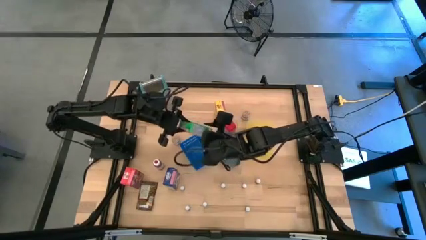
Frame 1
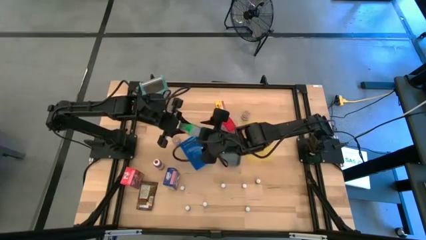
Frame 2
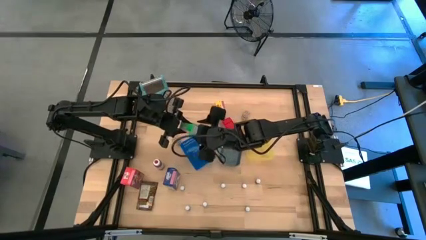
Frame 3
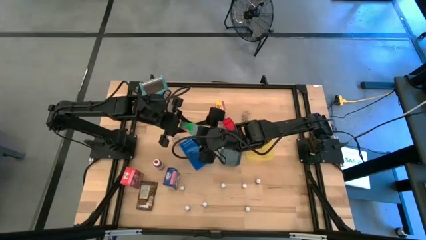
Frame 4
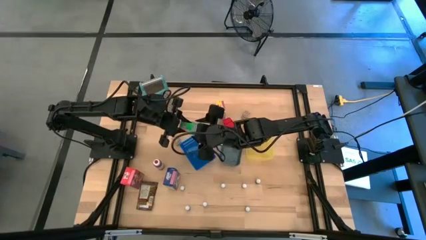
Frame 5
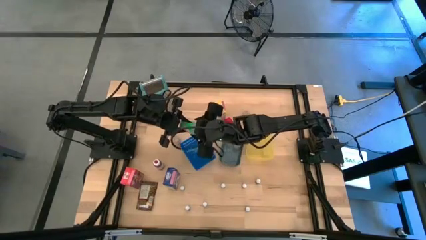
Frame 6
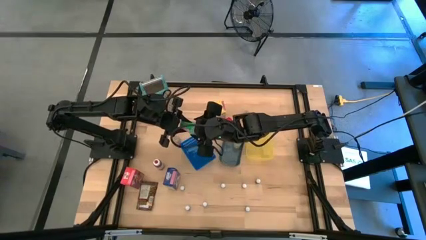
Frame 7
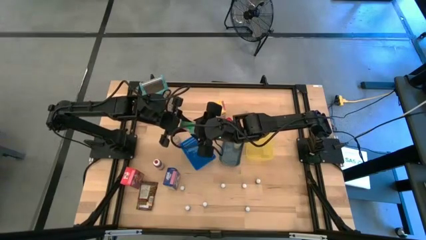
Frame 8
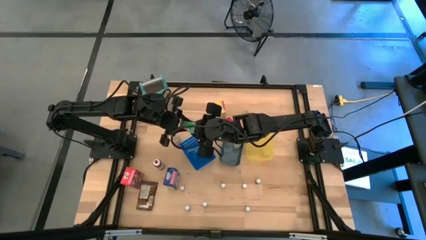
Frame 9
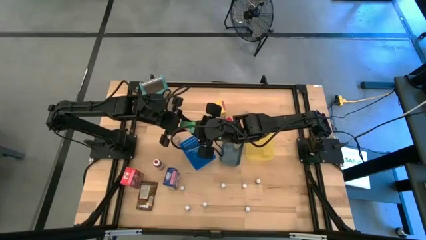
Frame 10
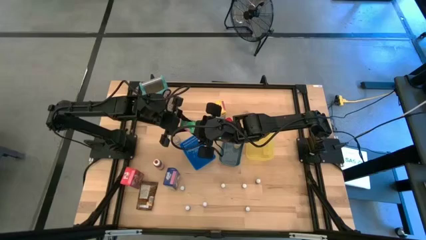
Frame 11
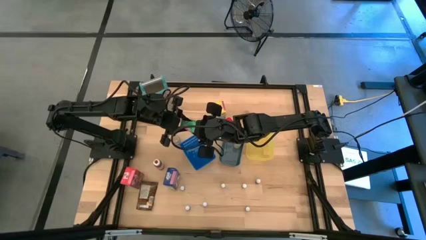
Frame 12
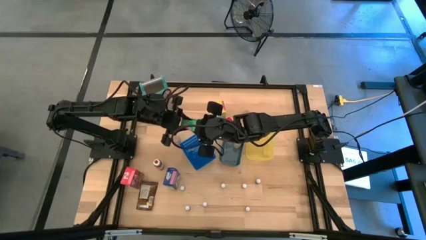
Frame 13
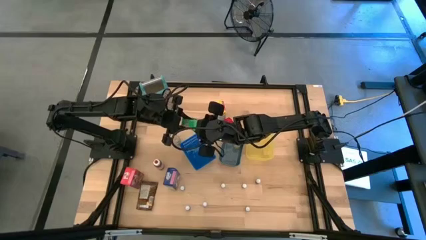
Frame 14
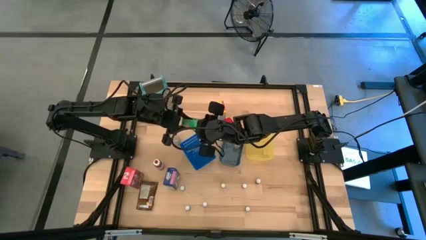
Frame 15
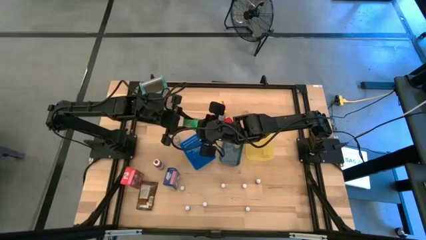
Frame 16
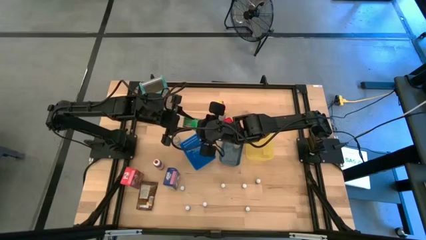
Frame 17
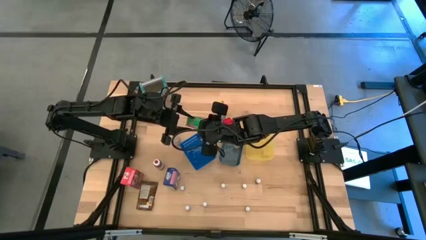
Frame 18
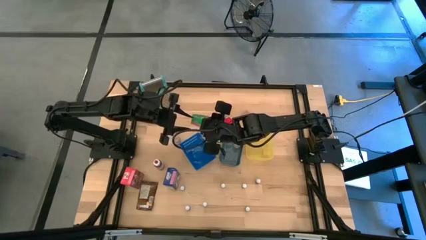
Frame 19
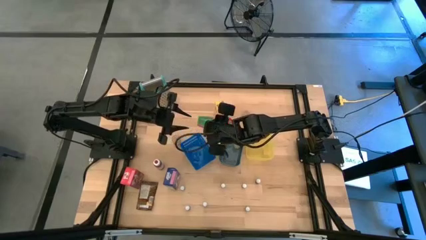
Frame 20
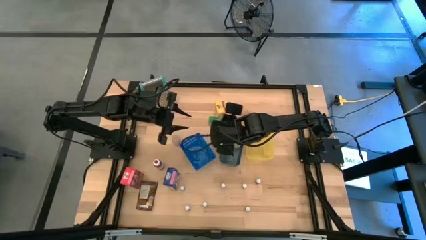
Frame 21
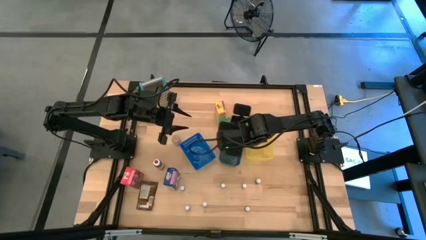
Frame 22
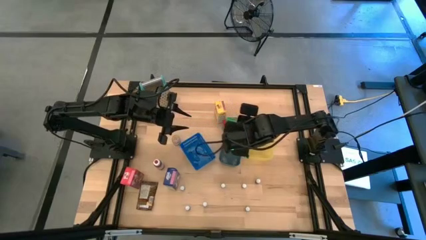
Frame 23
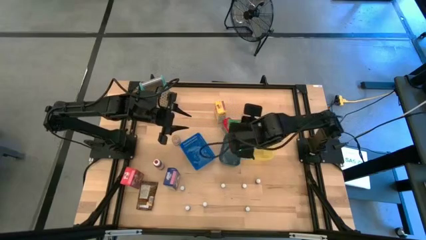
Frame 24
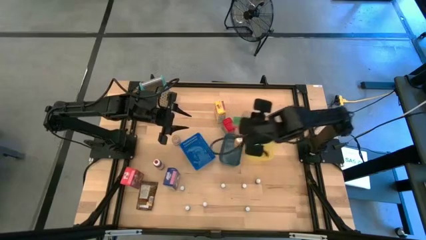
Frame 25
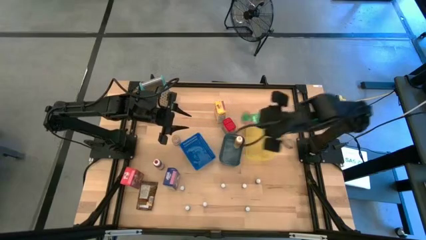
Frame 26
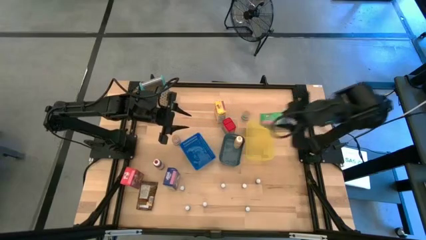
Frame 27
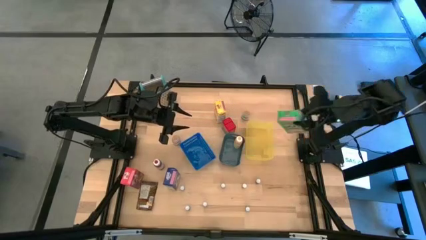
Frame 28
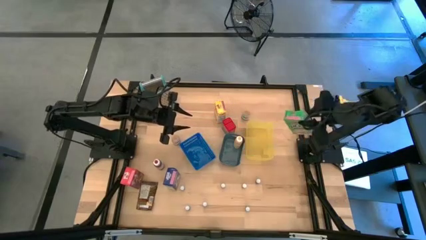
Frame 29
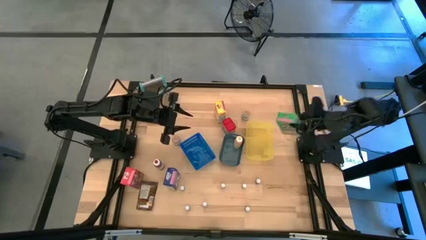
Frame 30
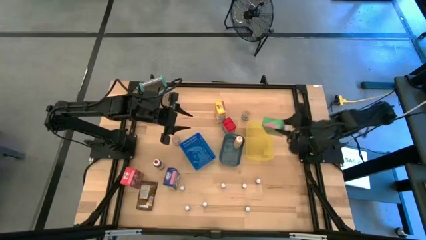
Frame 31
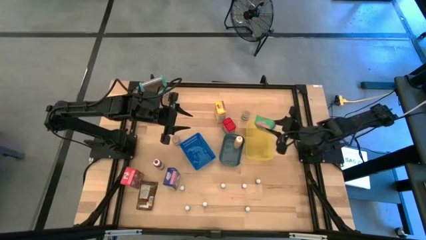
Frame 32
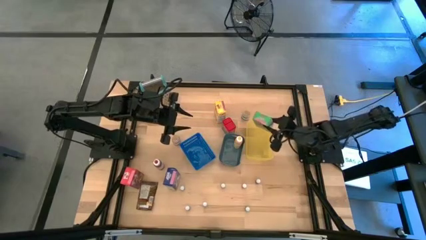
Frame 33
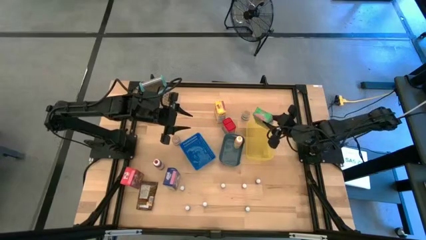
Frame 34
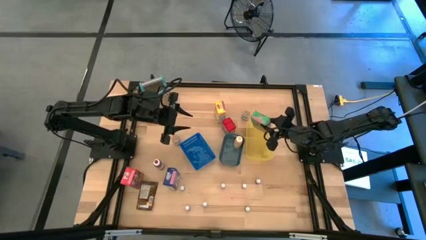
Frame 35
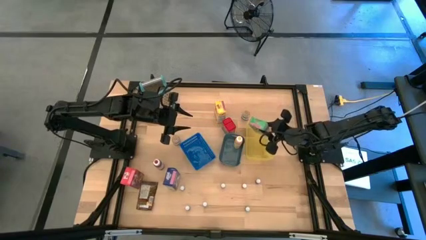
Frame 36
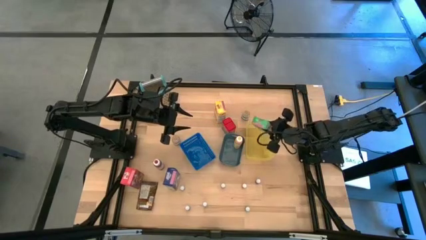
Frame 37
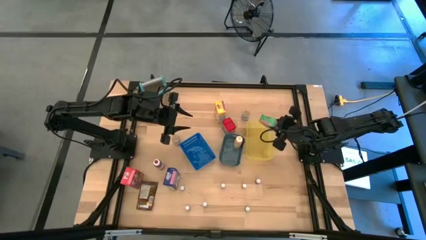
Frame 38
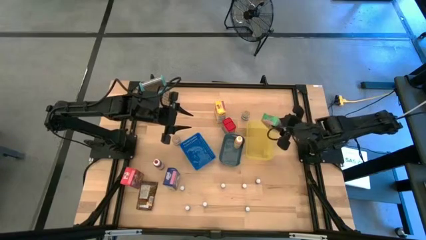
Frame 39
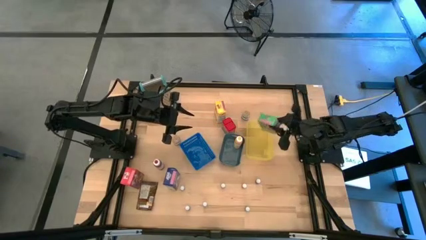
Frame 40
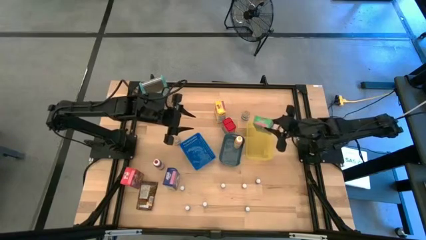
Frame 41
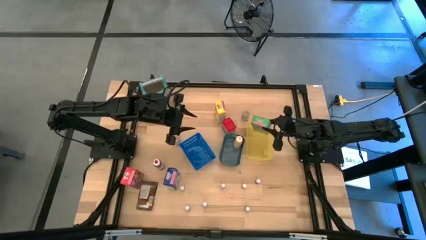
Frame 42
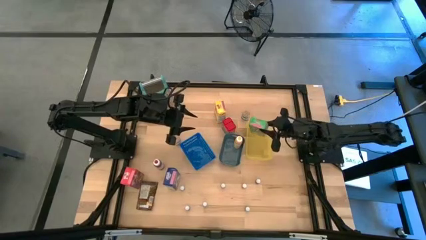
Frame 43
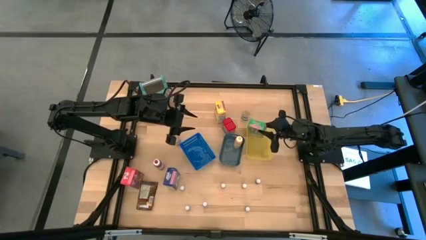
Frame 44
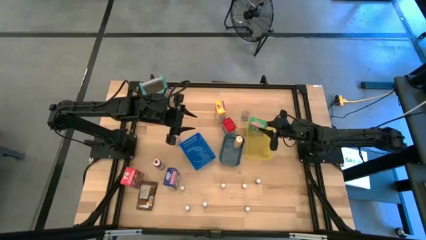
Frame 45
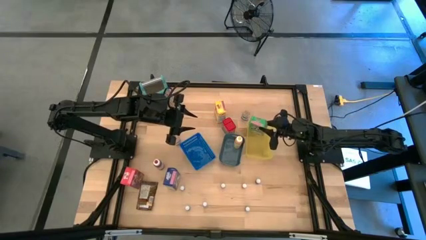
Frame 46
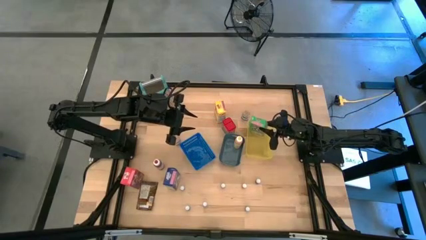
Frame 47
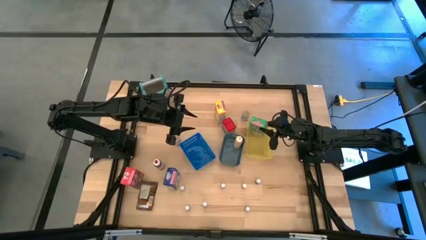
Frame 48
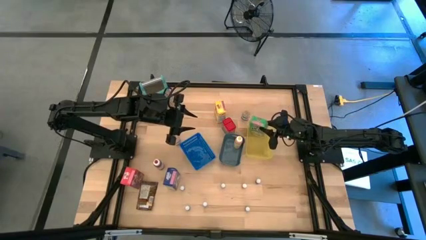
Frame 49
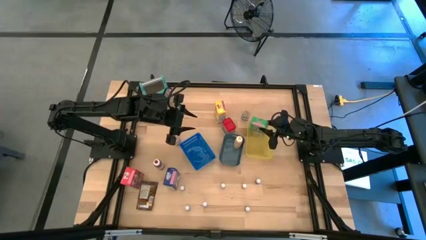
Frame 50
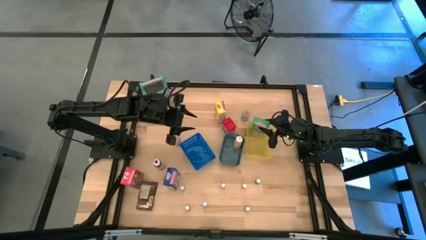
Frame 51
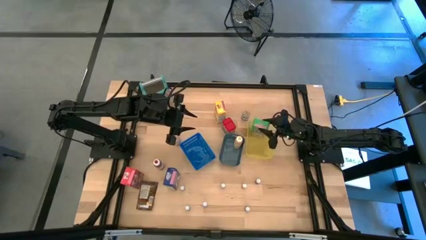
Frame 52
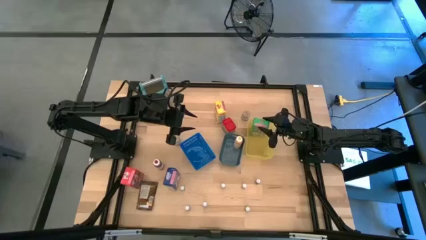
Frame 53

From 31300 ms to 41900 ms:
Task: Pick & Place Kitchen Items
Put the green cereal box into the yellow bin
